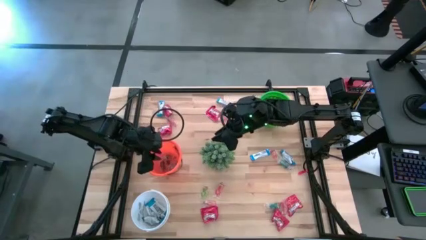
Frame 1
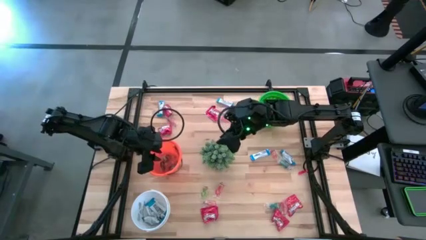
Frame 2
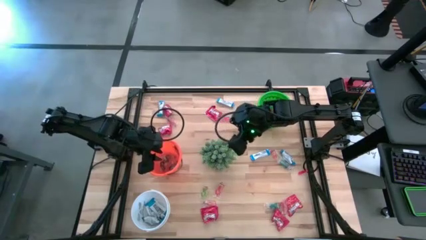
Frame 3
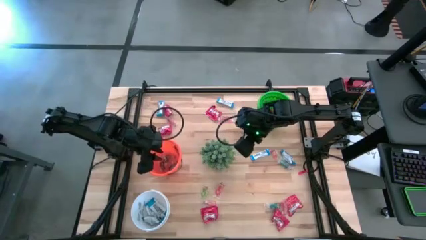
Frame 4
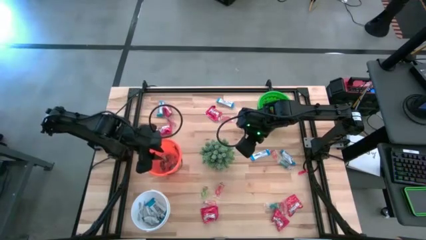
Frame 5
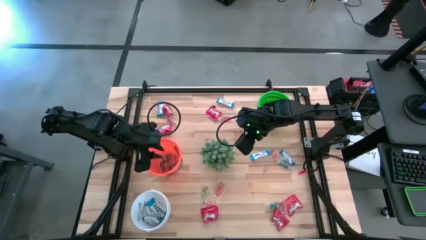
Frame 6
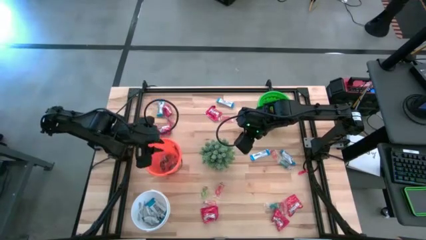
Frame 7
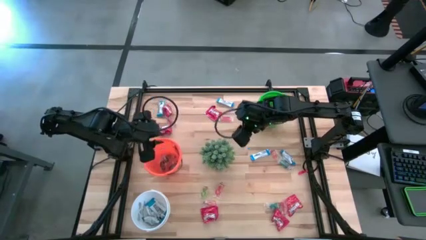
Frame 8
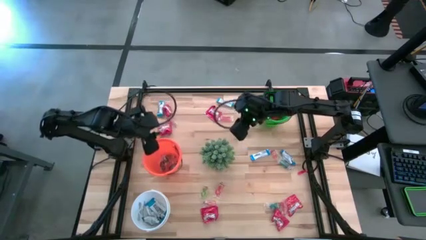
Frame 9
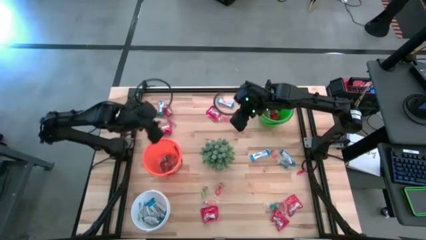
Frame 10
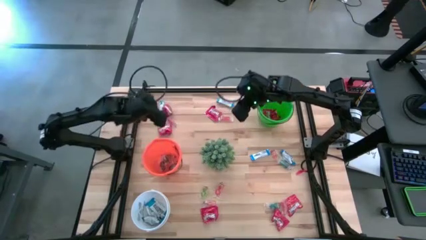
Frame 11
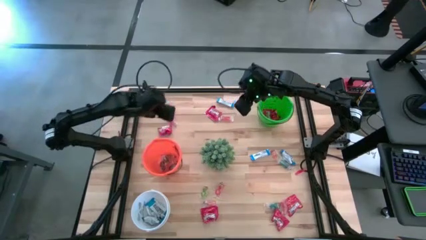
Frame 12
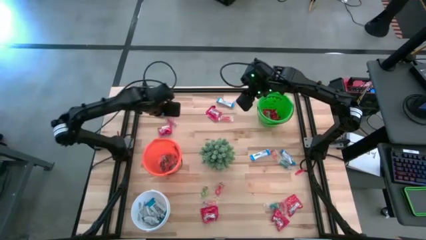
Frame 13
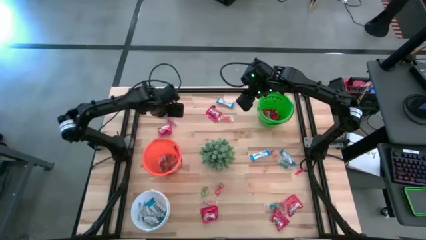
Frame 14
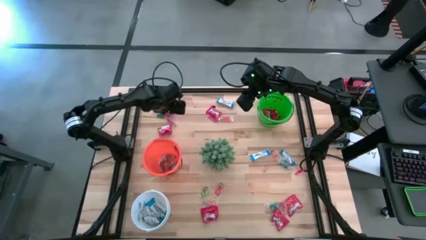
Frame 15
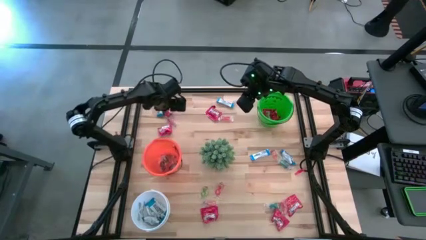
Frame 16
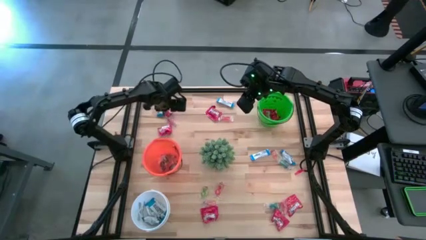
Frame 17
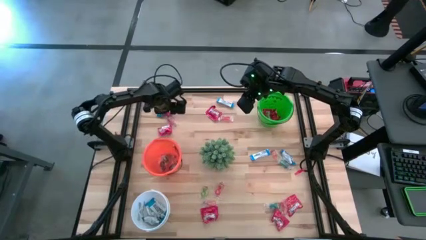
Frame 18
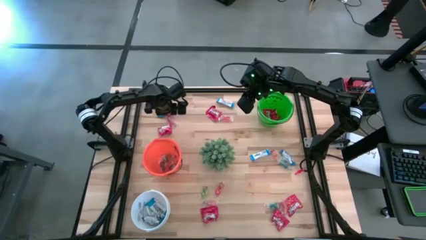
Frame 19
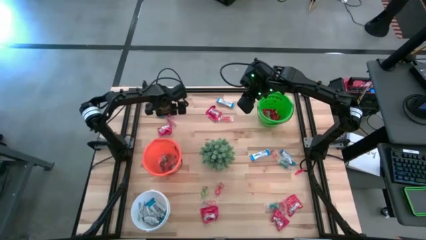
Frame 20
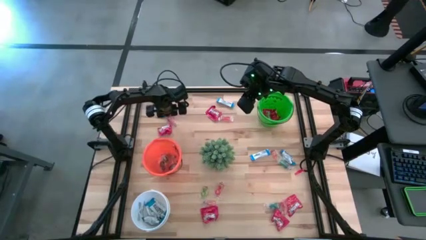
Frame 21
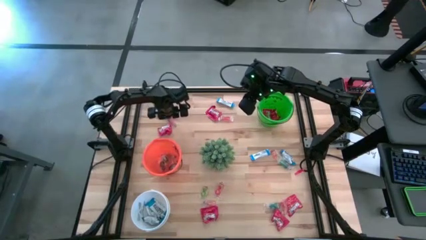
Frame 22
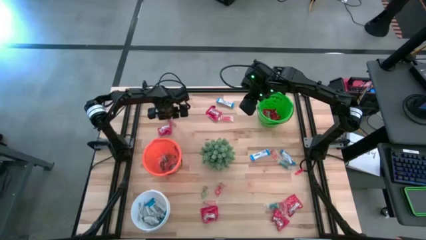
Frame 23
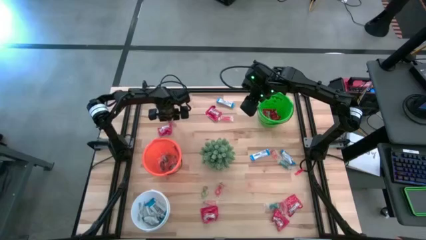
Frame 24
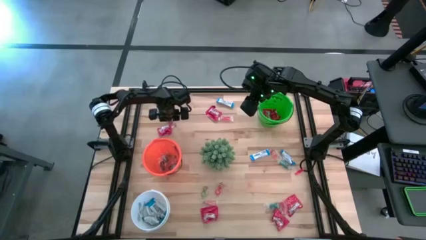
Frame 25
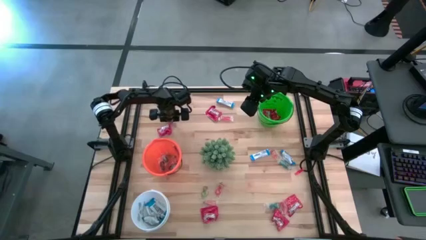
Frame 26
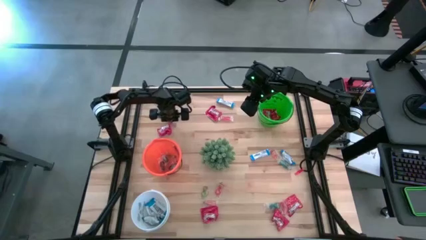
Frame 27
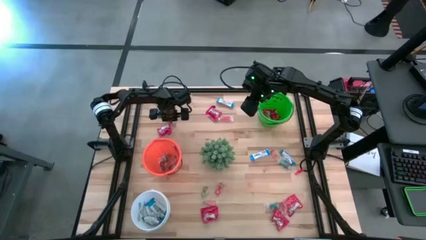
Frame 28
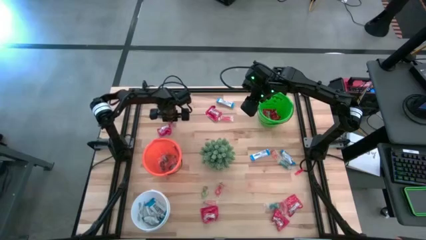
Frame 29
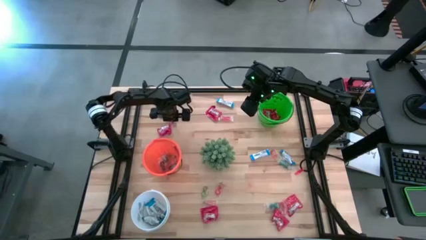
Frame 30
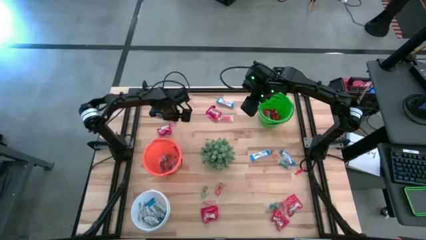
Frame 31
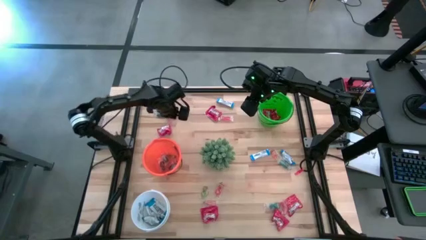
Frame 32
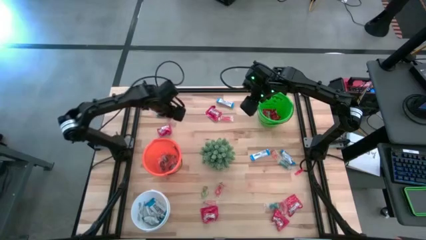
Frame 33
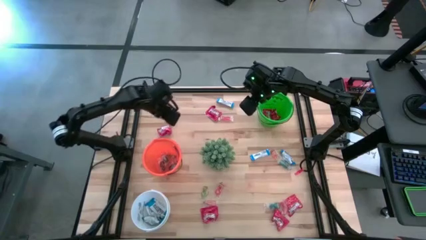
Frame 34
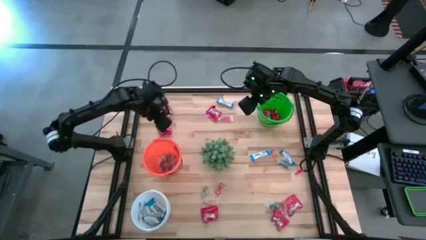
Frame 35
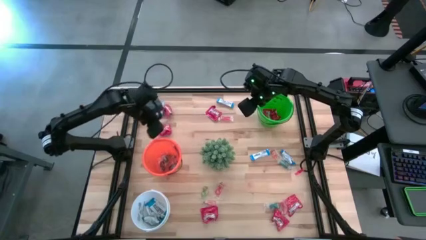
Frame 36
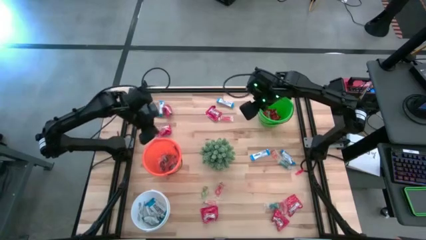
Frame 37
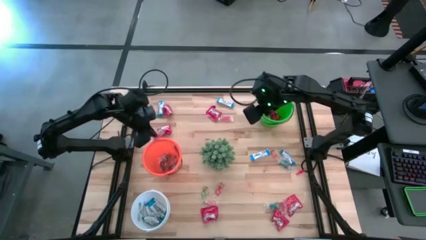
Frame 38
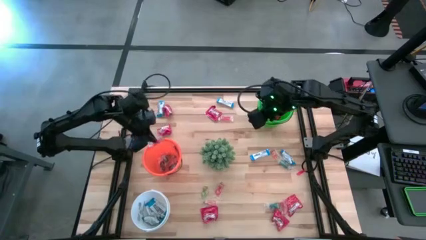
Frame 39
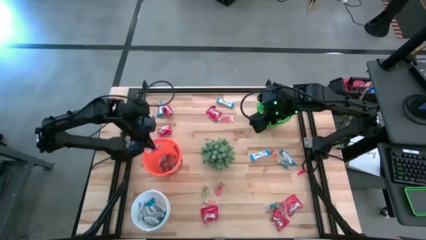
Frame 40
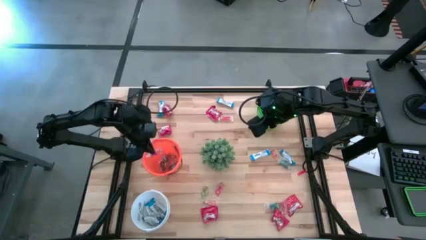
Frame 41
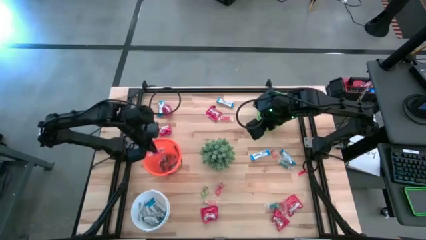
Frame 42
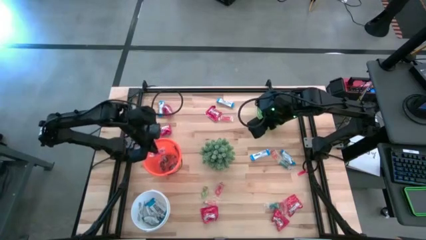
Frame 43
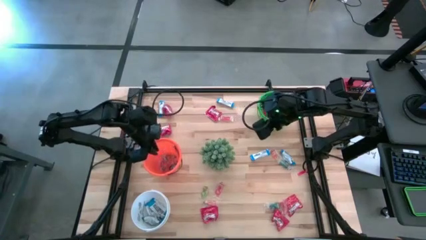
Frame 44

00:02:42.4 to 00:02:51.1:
Task: Sort candy
Put the red gummy into the orange bucket

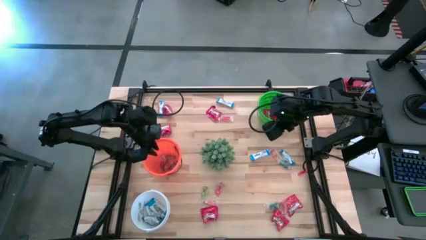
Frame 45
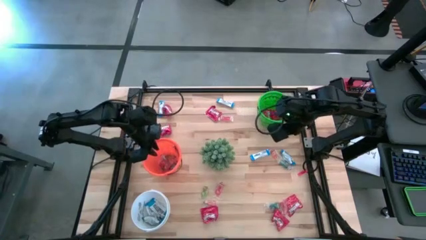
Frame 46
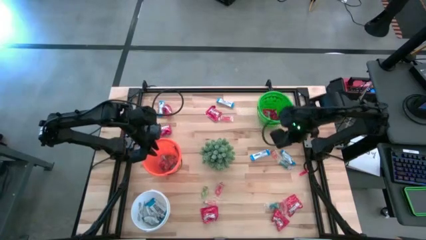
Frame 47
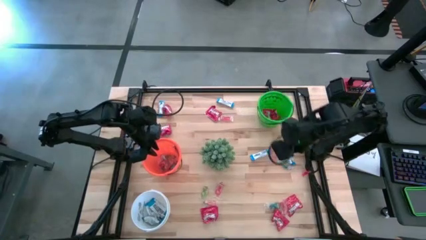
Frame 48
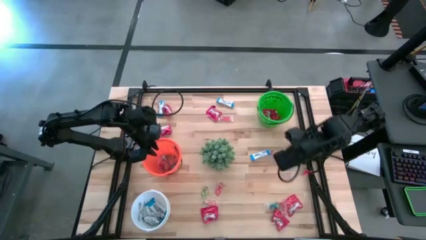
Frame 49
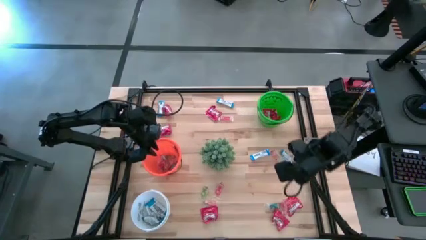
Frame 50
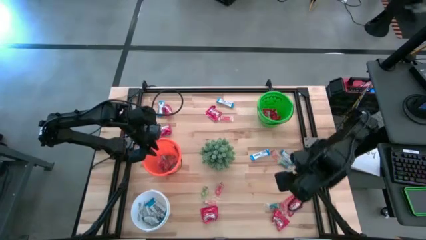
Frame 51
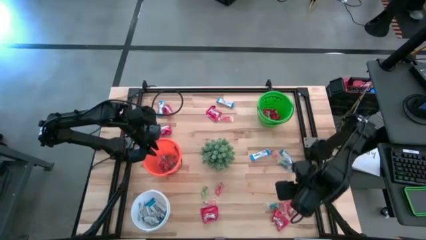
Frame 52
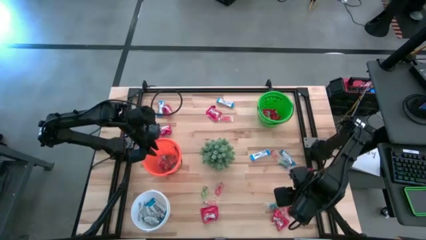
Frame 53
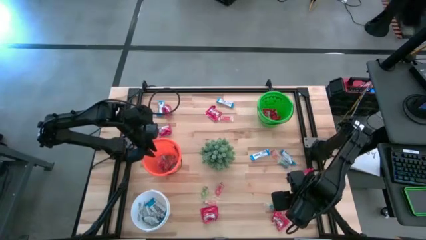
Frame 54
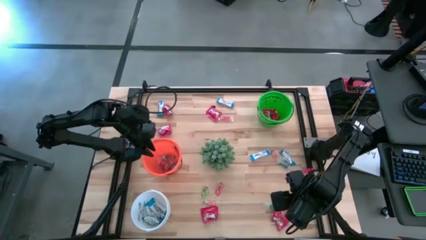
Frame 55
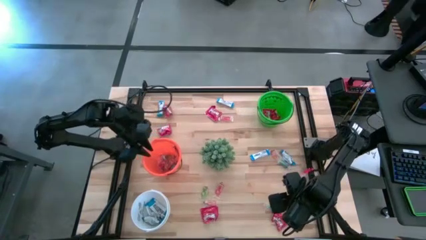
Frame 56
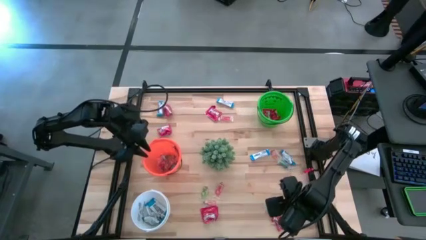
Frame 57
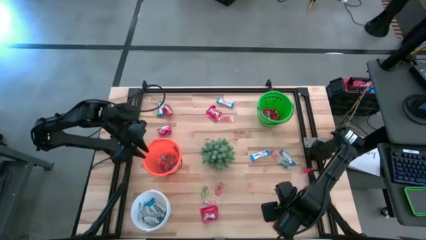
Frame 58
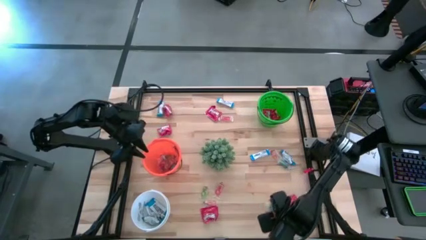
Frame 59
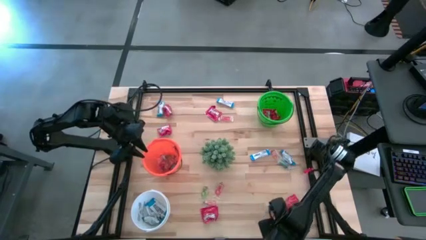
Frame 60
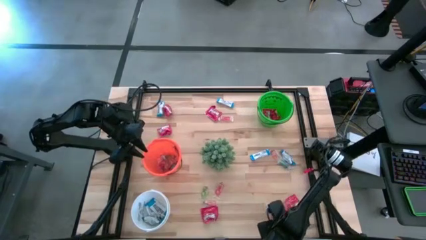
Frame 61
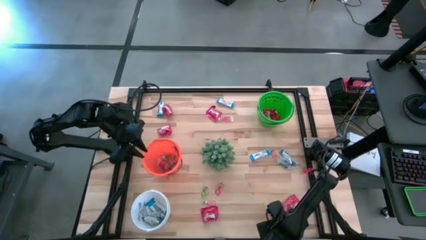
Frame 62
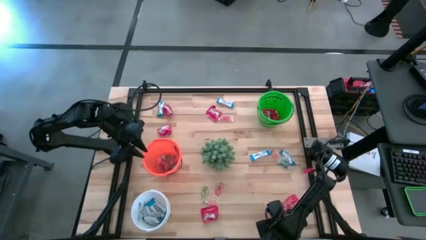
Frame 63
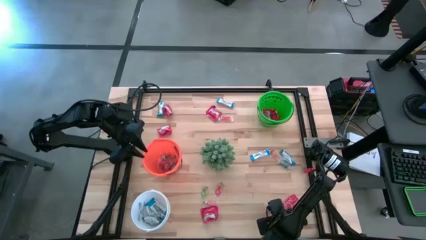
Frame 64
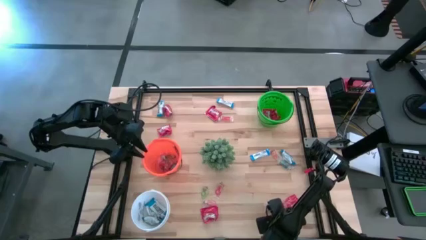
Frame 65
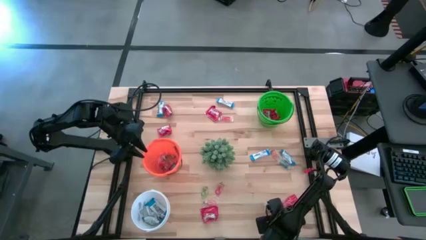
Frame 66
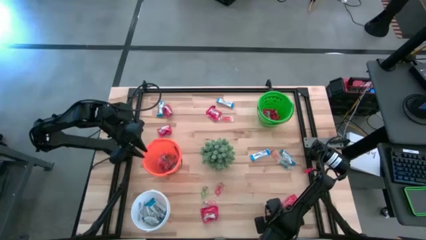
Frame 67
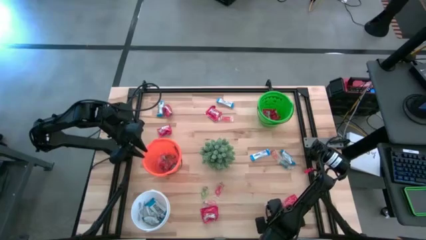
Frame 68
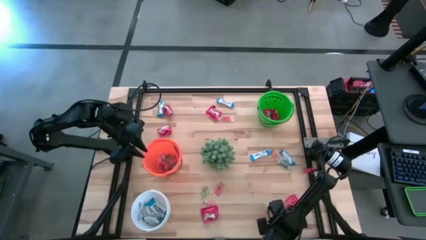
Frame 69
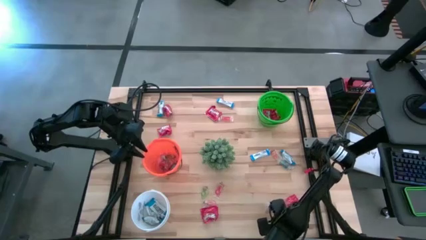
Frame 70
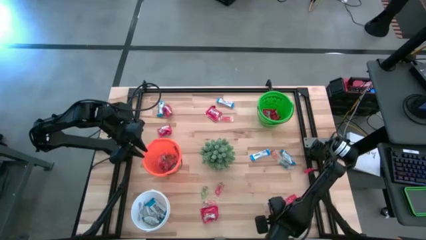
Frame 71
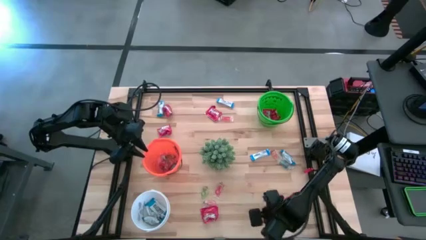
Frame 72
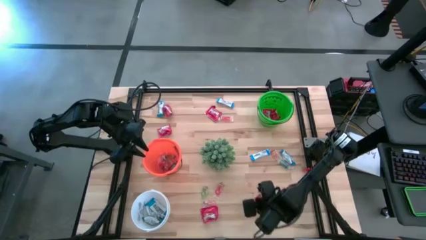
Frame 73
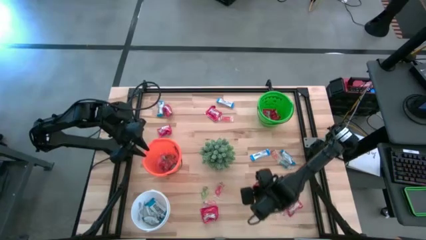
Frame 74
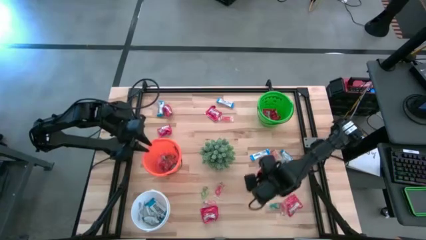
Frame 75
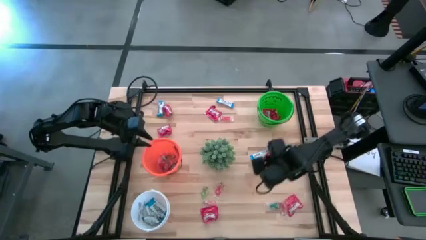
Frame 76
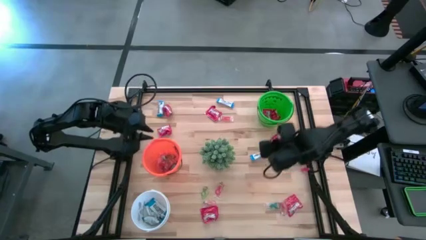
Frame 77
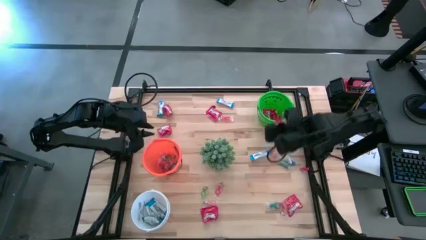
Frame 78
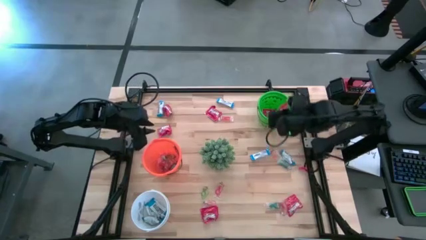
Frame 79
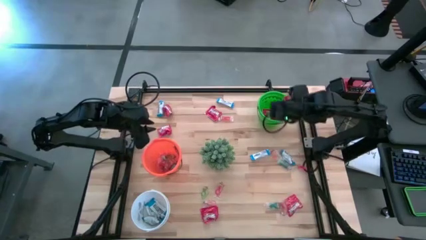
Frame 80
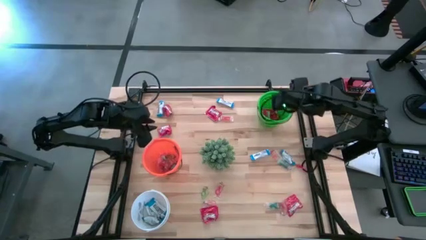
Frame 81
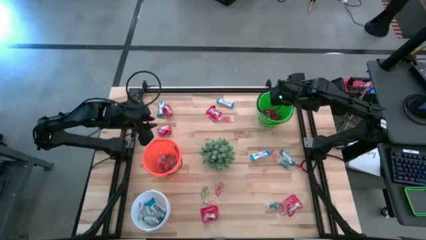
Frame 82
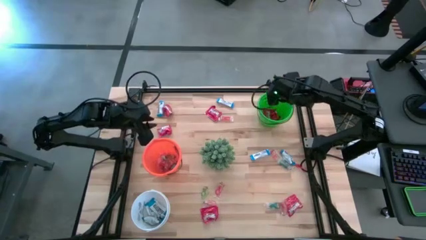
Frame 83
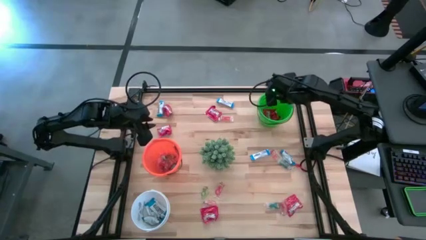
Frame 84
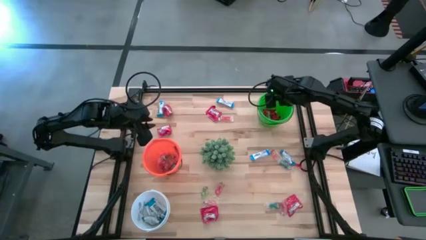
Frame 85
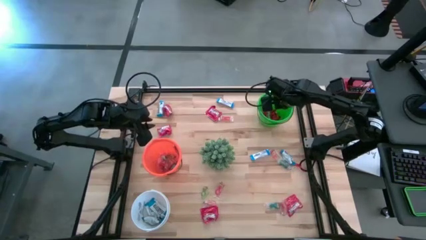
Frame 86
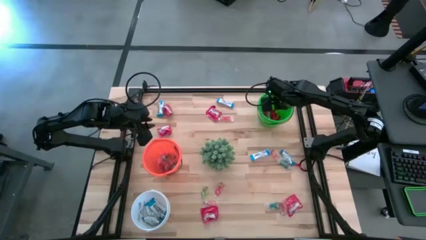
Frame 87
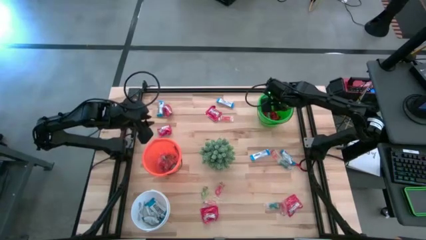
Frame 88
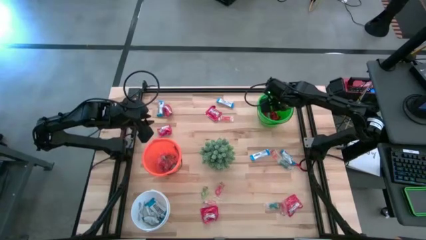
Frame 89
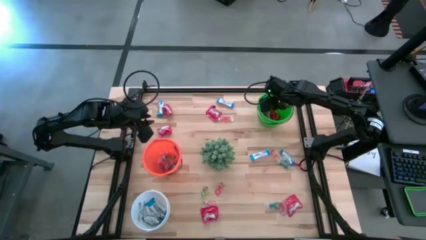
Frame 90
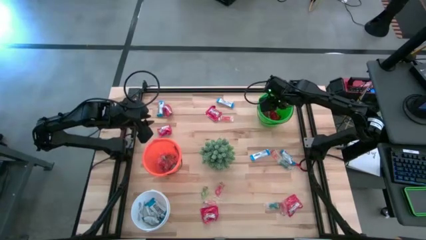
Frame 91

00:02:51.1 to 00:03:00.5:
Put the red candy into the green bucket
